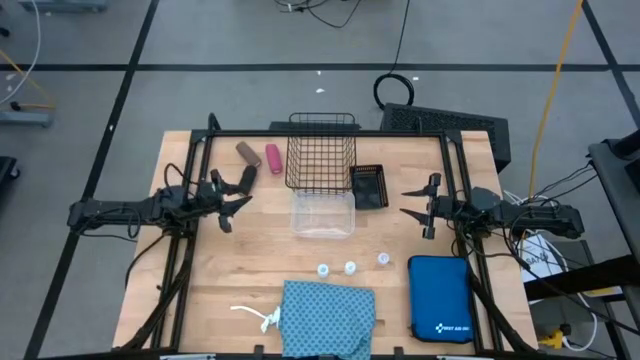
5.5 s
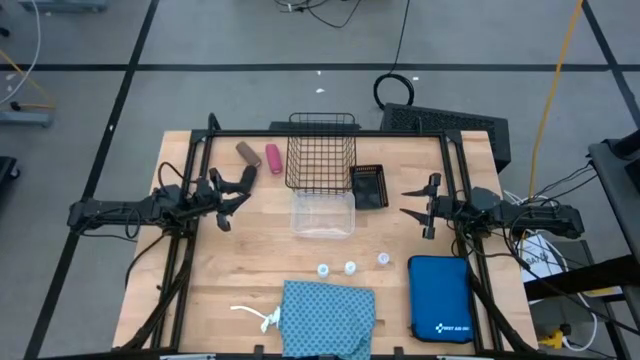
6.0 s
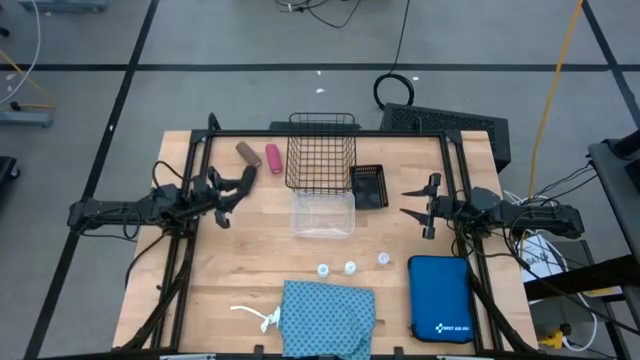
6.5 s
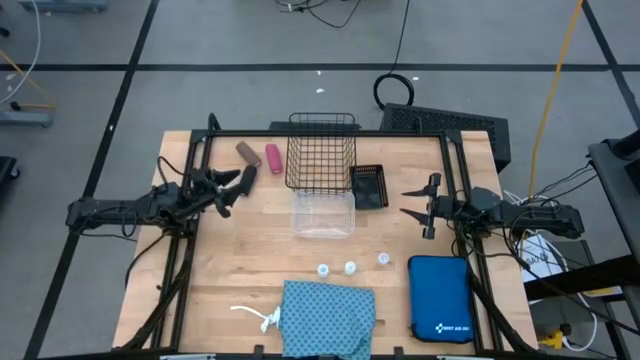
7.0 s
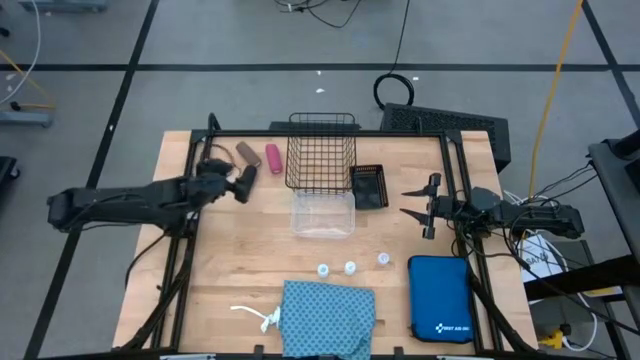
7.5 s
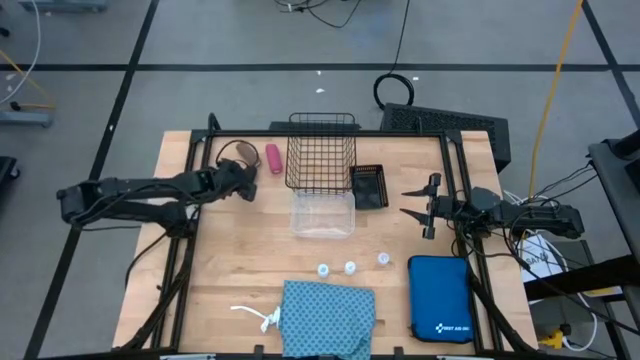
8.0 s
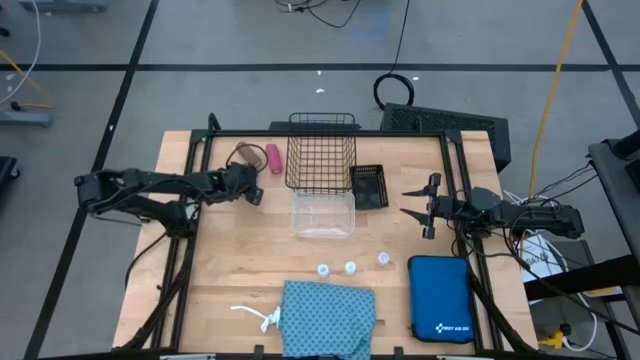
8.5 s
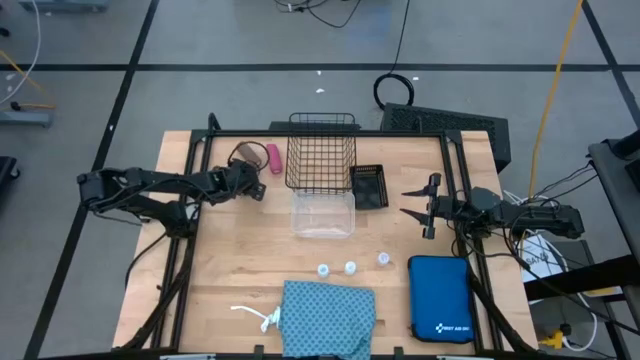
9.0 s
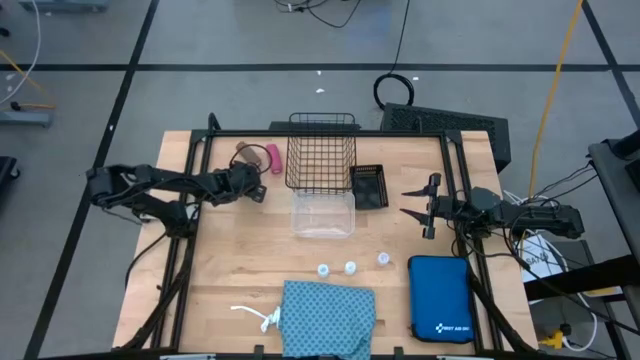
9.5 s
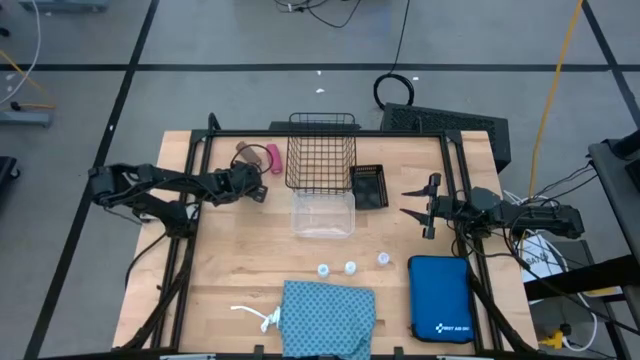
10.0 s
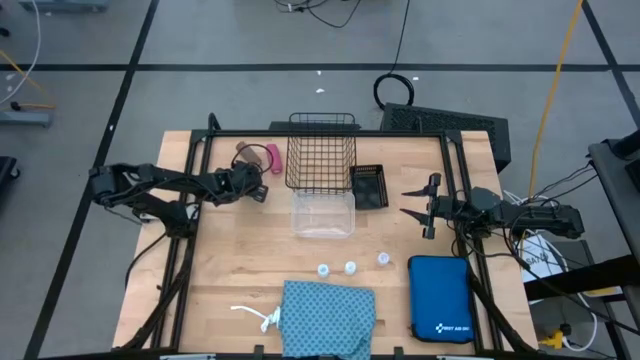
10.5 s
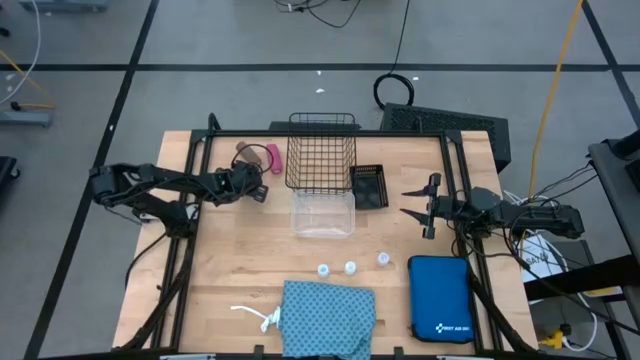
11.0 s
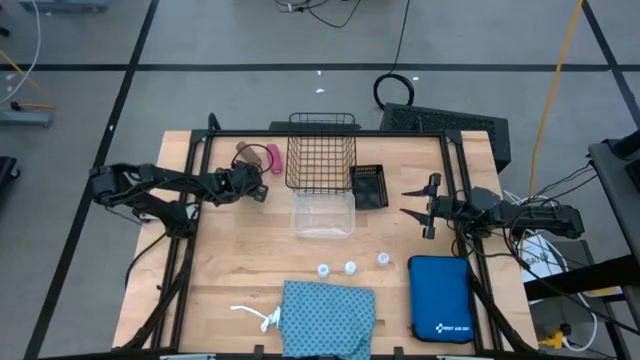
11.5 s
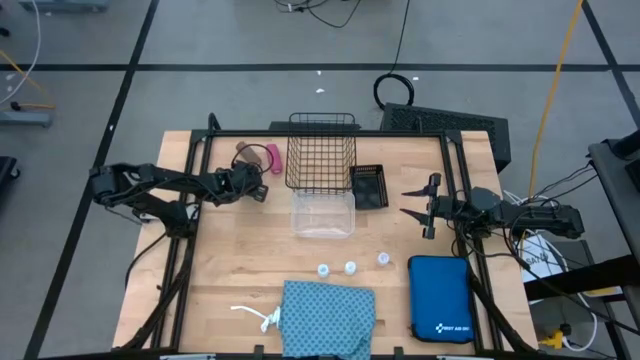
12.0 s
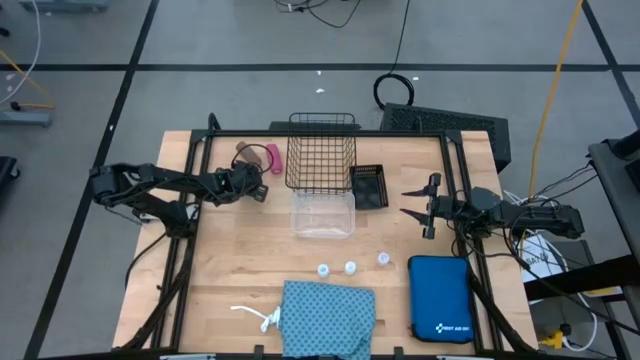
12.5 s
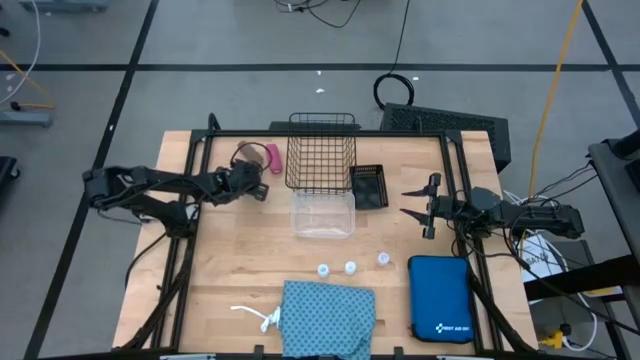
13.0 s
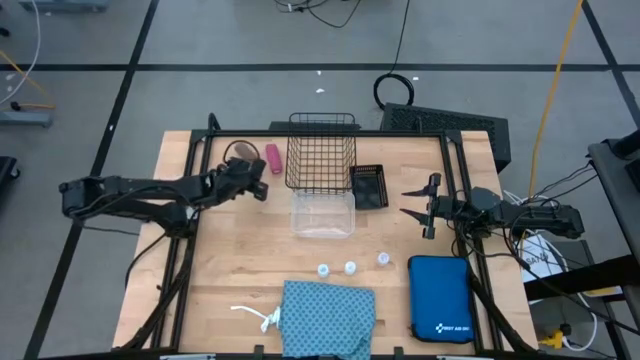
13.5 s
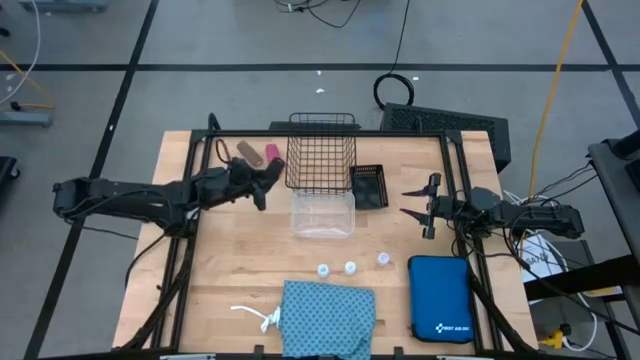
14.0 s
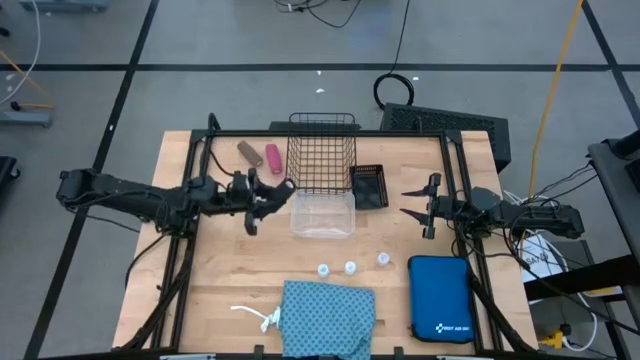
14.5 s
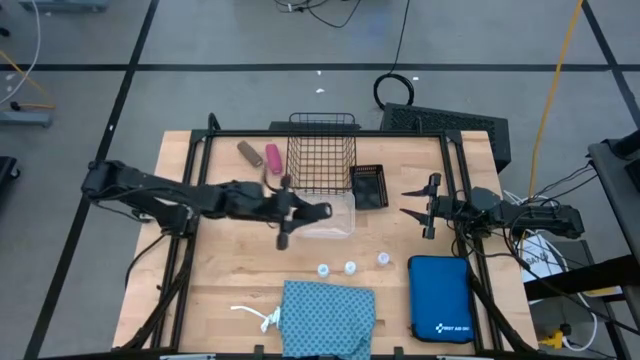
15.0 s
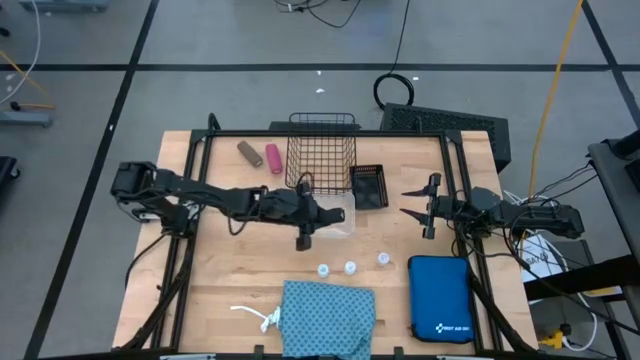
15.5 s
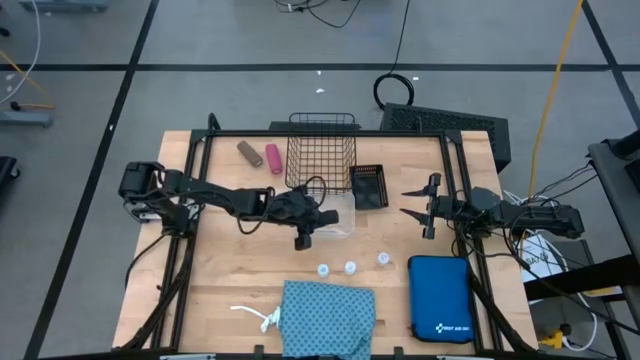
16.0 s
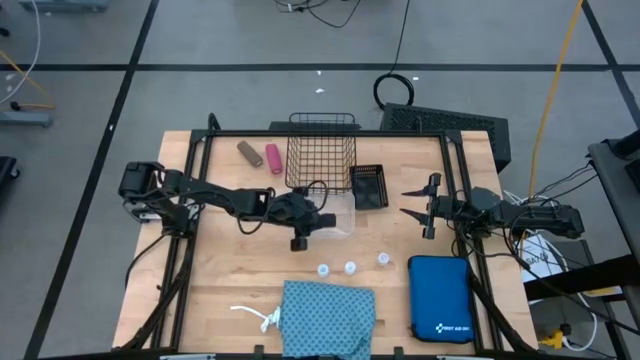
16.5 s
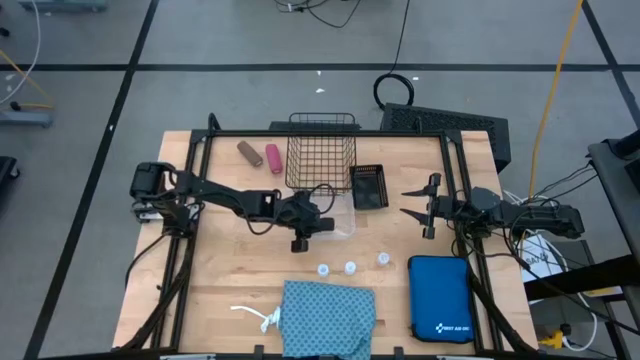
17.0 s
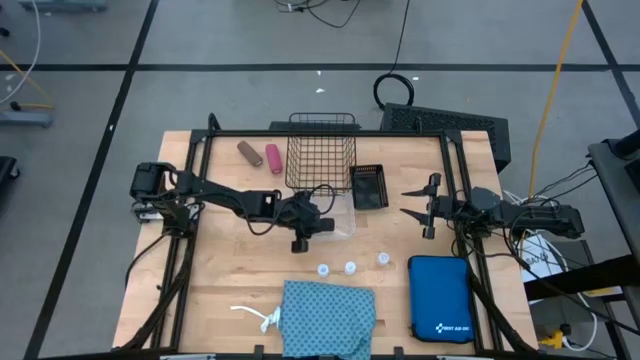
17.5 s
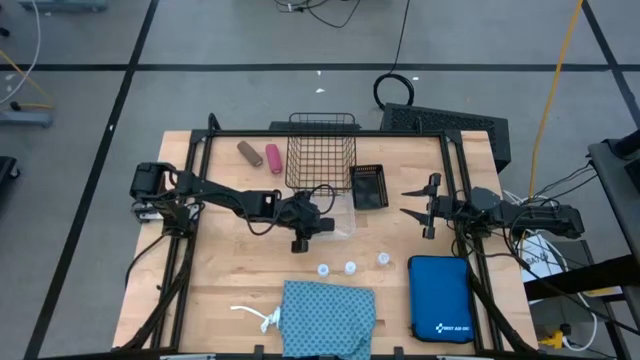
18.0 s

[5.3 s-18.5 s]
Task: Pick & Place Medicine items
Put the black bandage into the transparent bin
